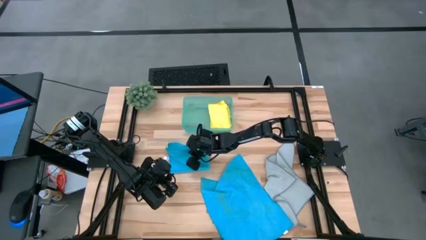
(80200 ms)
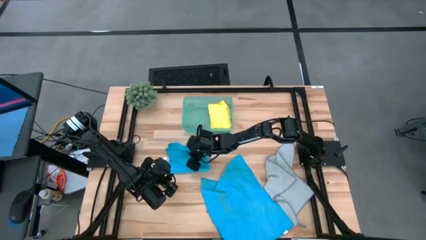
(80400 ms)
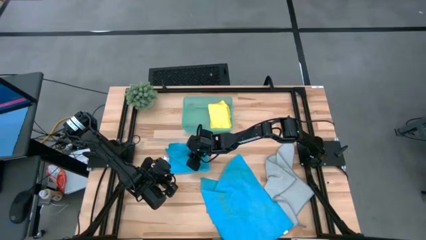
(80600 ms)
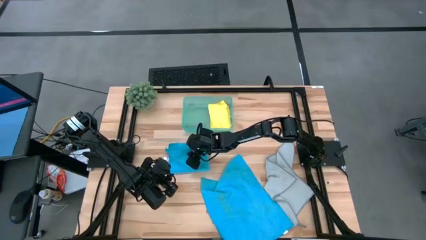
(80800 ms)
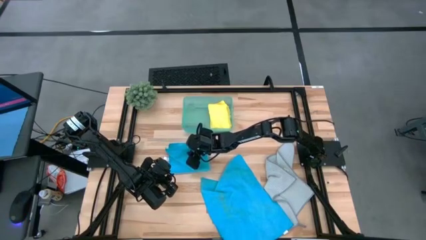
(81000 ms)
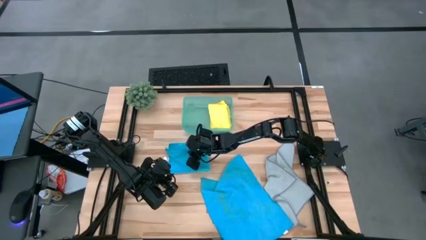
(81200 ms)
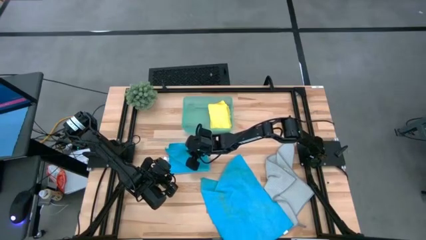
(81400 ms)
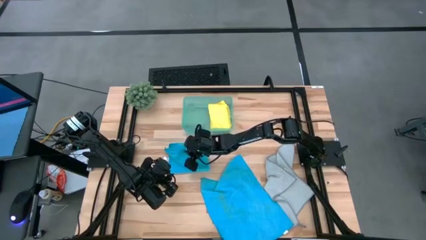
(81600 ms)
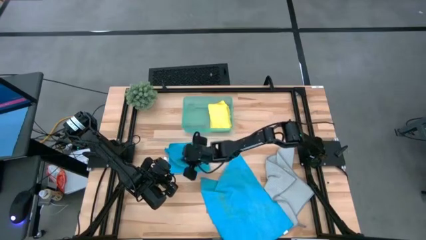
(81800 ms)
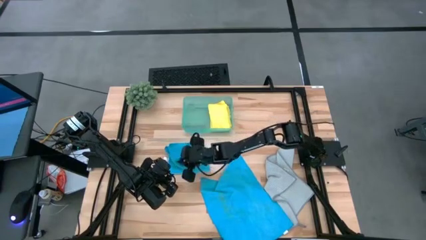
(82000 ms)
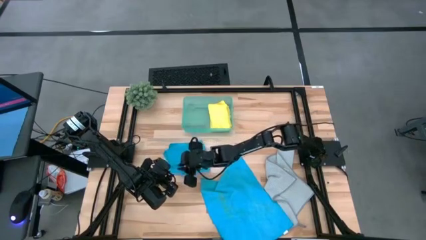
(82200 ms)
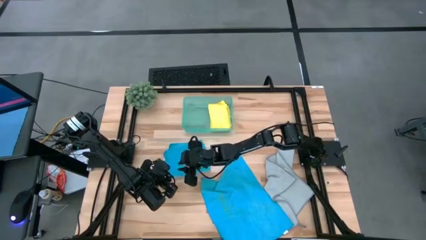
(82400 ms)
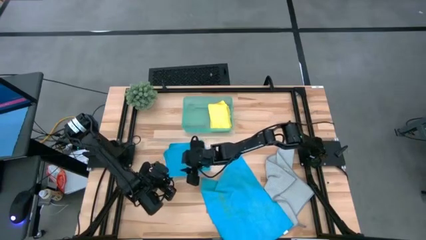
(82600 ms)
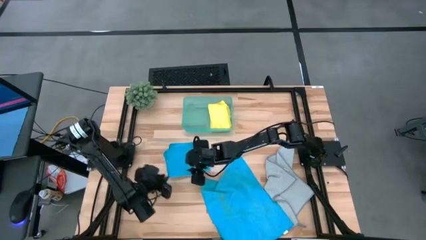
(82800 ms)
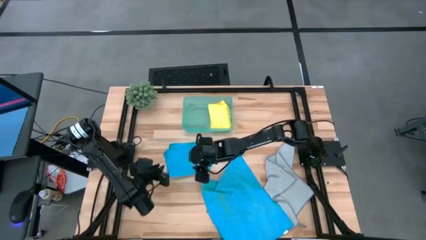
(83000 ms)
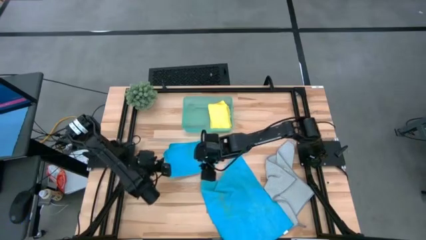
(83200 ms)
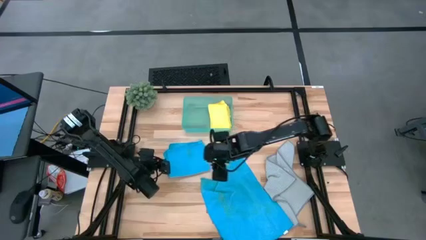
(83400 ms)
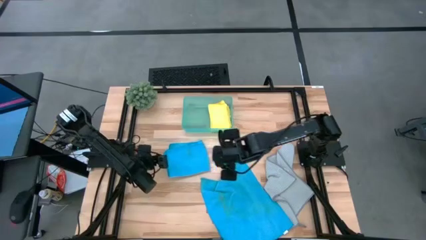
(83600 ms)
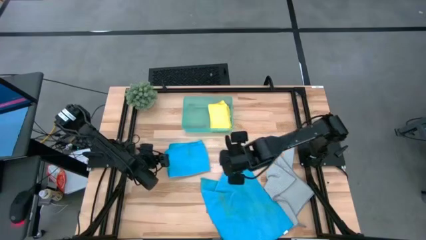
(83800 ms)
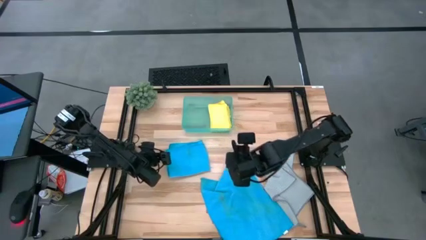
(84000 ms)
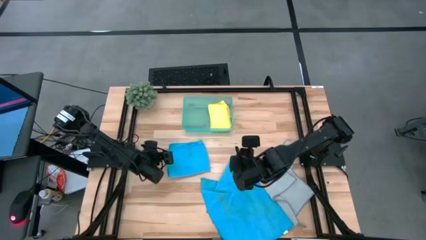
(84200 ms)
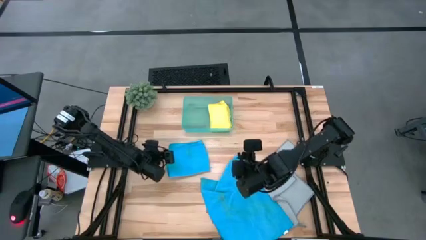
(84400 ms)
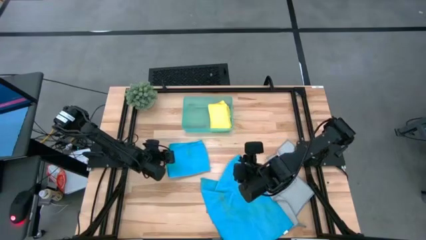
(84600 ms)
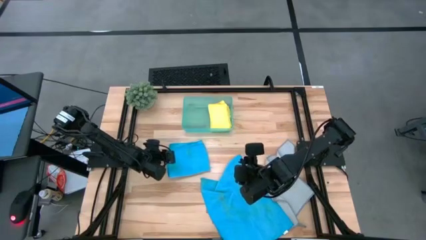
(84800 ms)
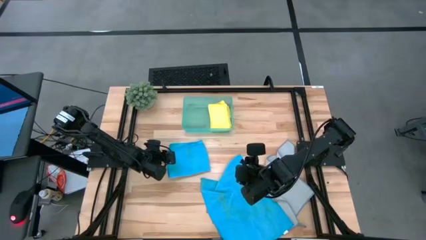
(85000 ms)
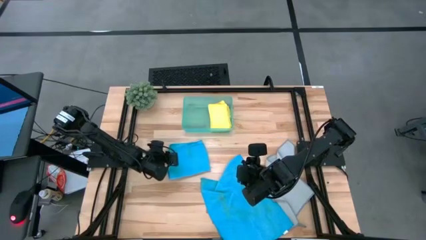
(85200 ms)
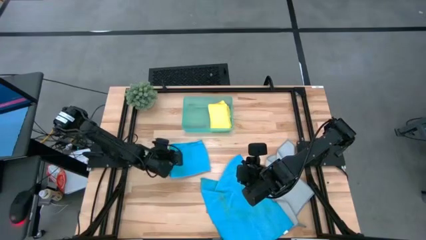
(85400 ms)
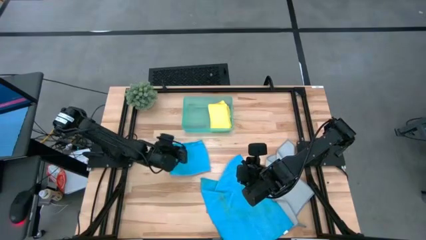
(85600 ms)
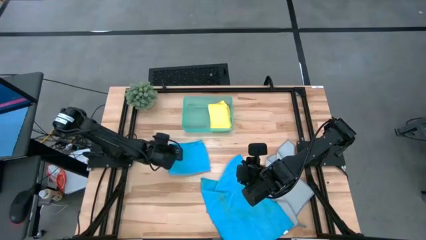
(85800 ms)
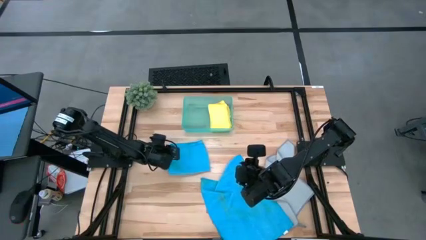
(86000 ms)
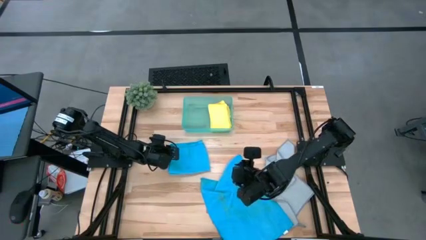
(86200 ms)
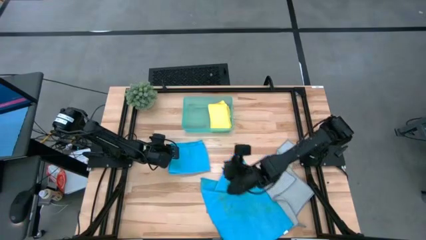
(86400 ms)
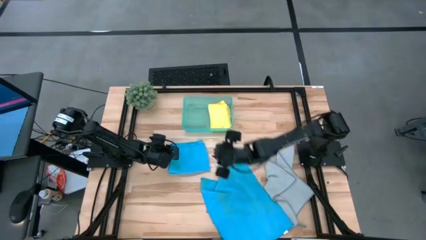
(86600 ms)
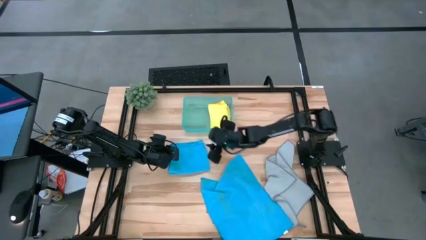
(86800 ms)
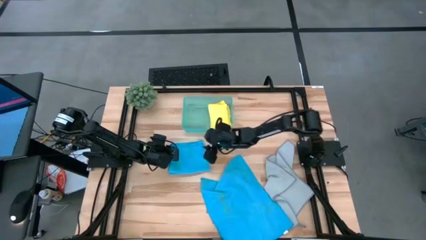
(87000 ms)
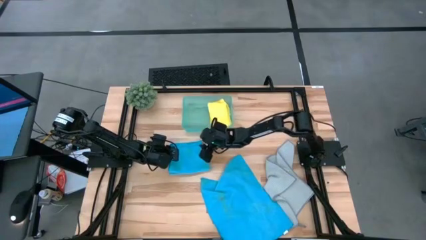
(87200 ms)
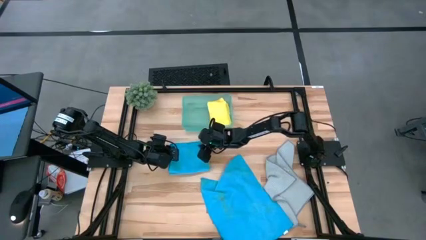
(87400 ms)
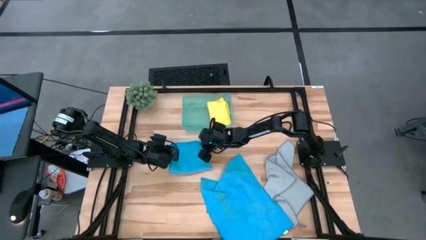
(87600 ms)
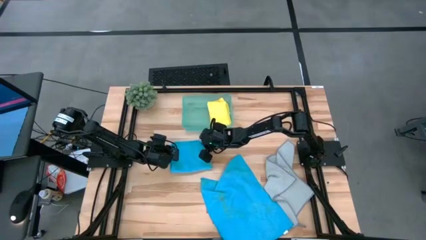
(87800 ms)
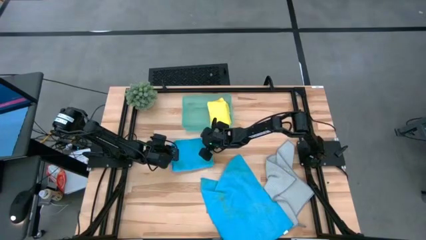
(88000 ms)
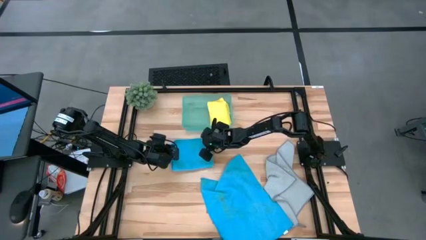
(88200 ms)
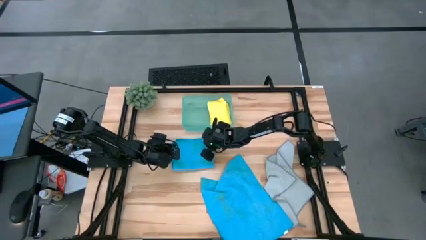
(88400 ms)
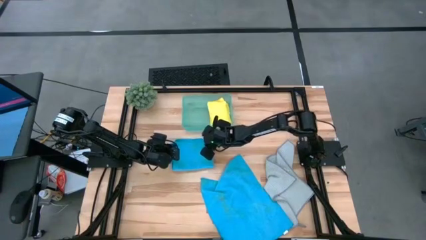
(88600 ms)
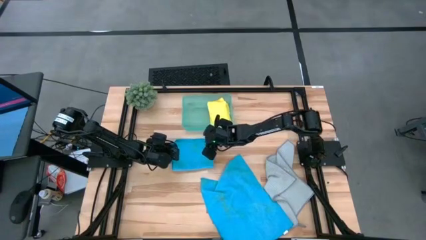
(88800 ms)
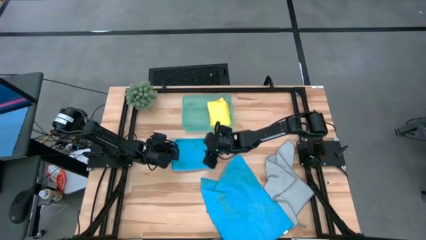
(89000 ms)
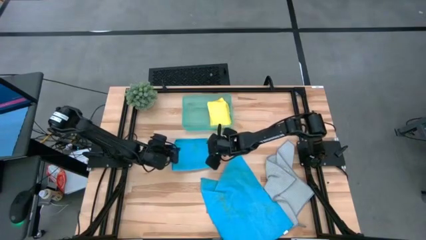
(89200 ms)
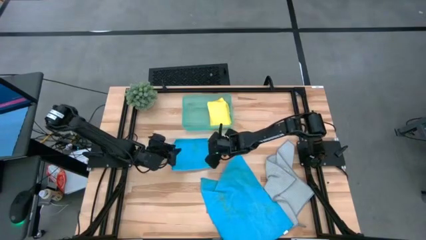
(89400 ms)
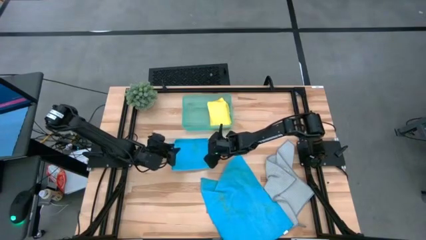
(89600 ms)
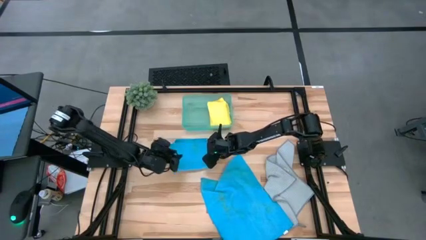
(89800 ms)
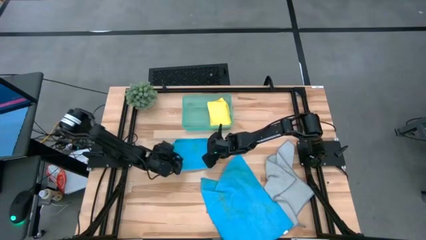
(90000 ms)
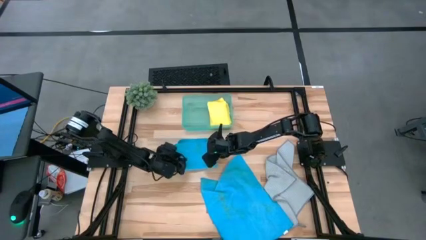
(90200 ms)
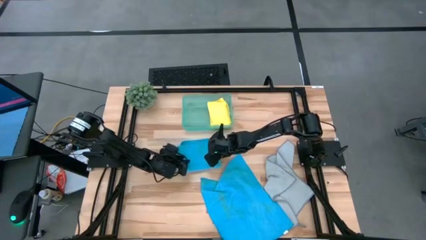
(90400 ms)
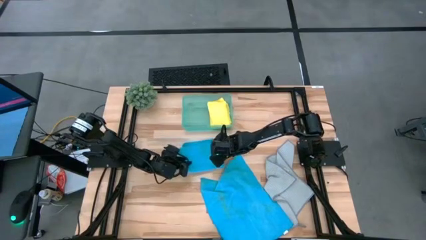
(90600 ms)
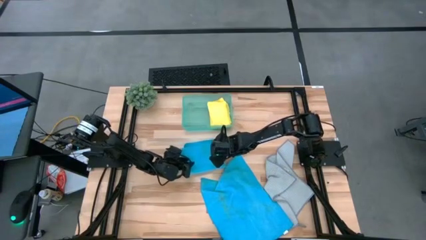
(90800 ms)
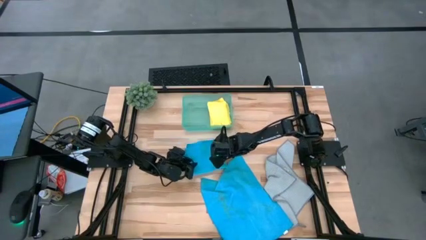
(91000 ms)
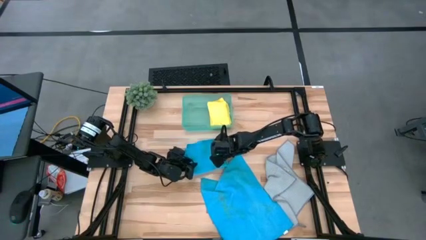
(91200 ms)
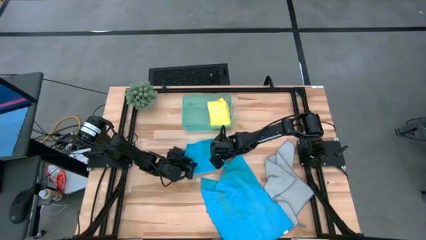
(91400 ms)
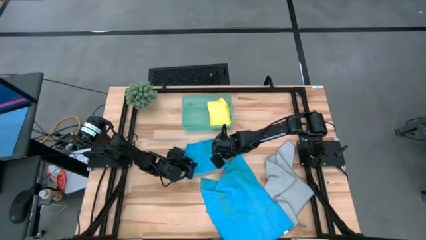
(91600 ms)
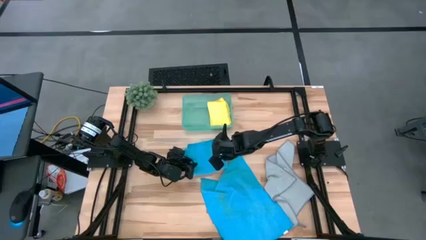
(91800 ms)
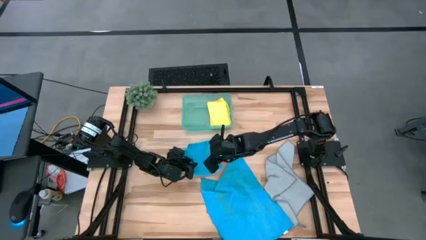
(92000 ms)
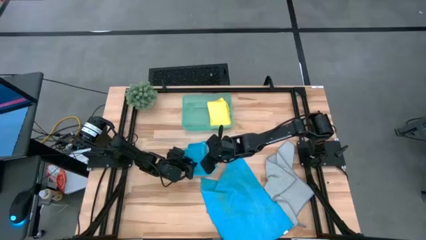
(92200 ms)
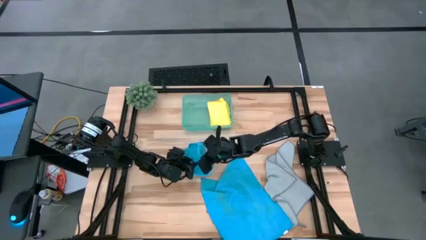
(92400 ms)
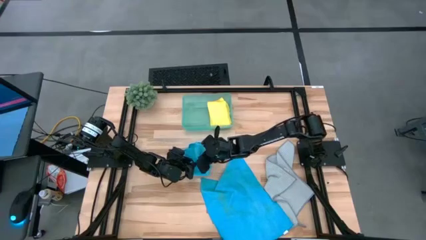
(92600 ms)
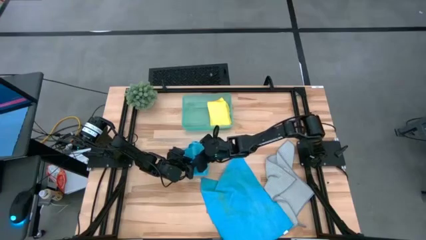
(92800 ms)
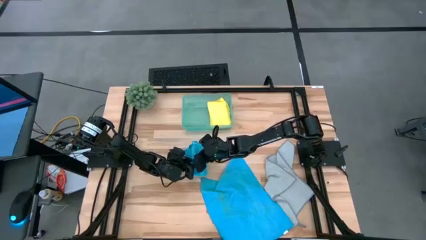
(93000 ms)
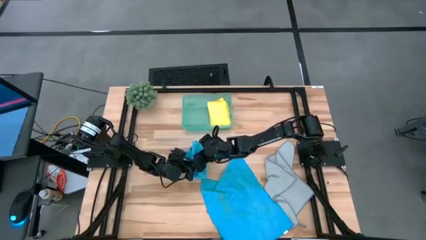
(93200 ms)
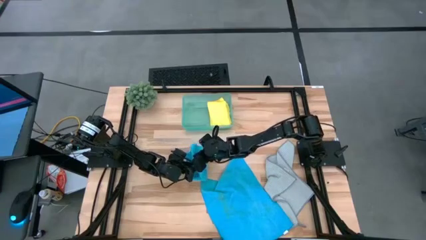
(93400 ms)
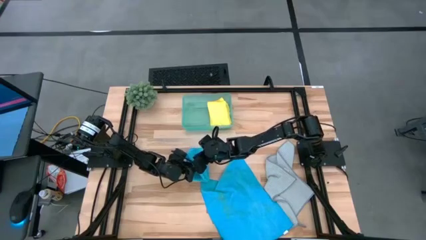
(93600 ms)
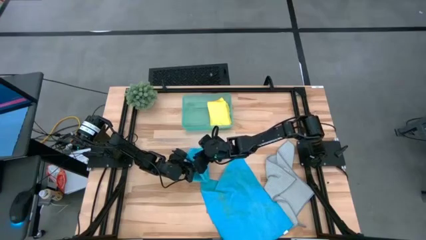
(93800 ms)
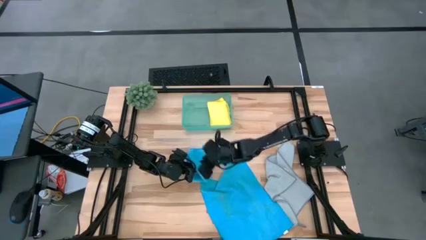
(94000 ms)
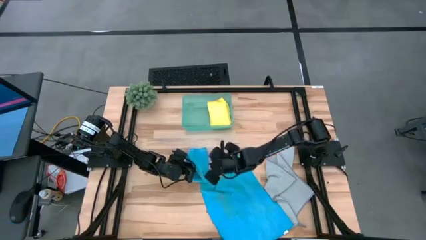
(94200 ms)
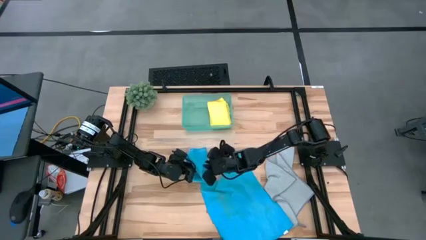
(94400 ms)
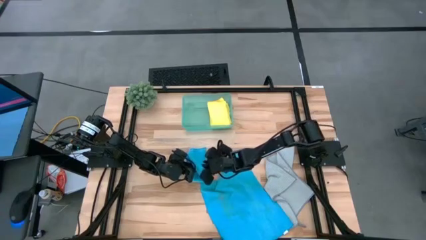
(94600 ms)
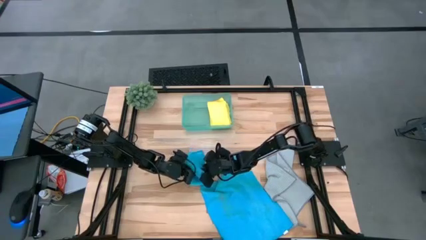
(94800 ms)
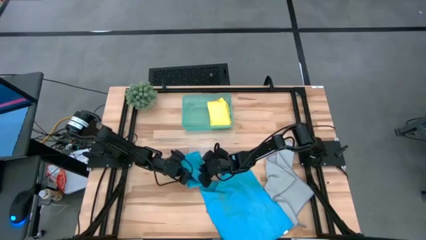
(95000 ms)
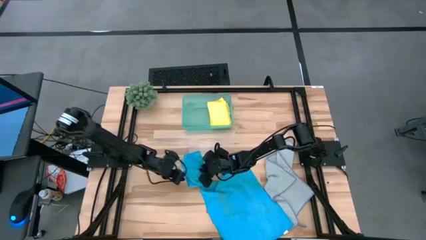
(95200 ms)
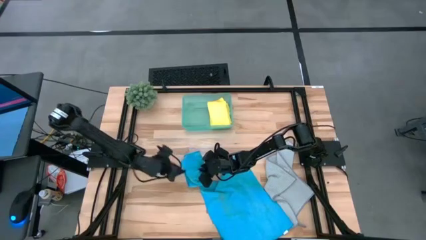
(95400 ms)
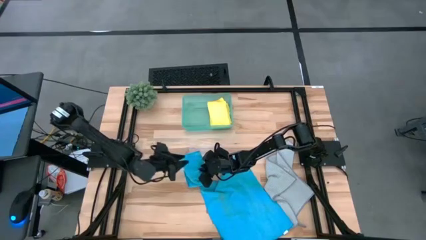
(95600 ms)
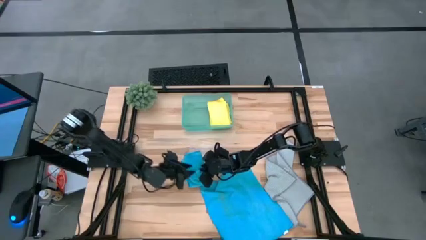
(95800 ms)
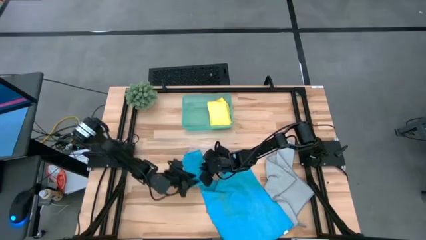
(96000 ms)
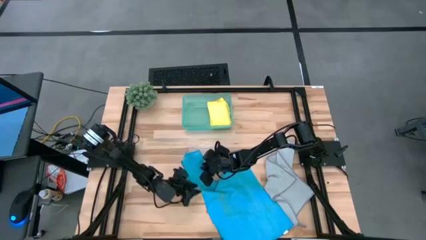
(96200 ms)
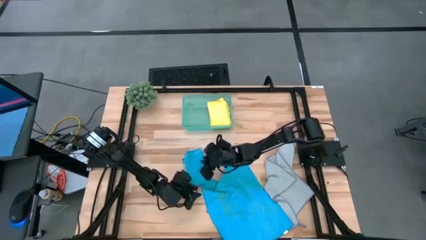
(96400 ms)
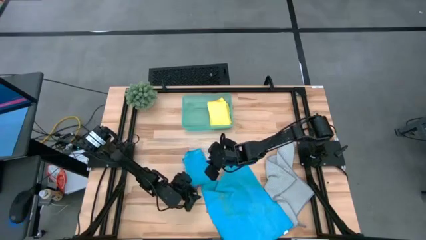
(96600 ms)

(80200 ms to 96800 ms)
Task: Fold microfiber towels
Fold the left blue microfiber towel
